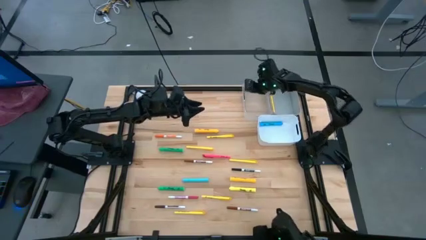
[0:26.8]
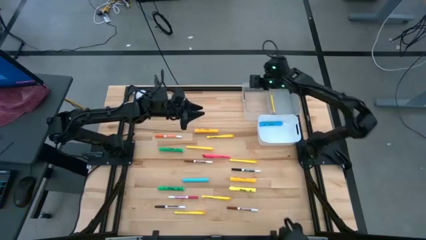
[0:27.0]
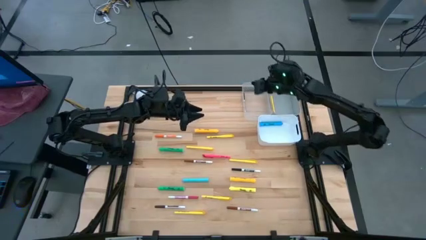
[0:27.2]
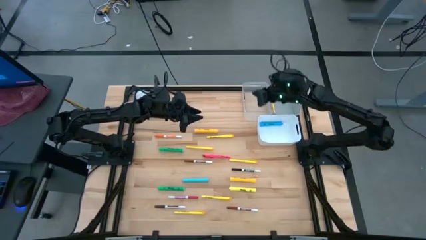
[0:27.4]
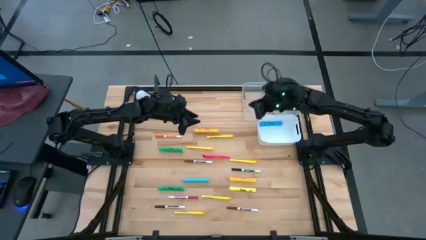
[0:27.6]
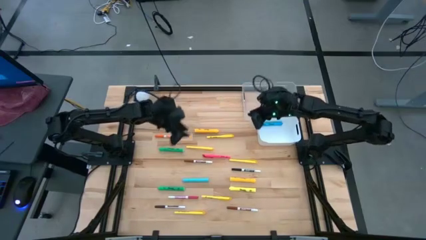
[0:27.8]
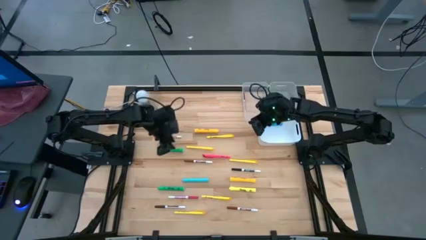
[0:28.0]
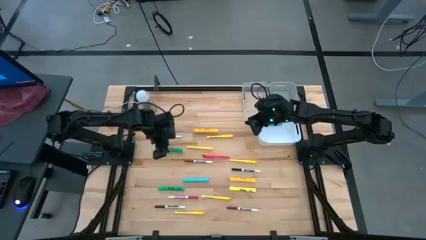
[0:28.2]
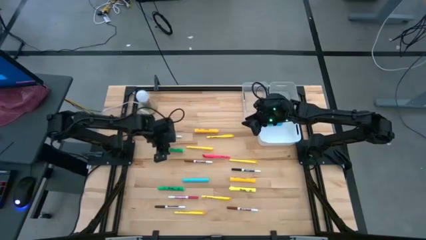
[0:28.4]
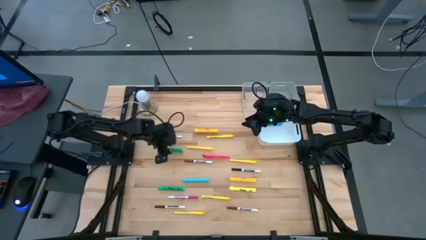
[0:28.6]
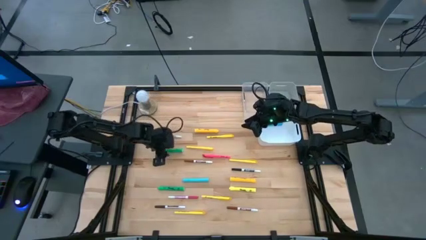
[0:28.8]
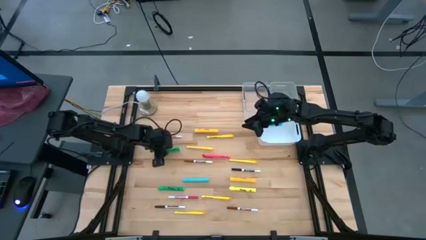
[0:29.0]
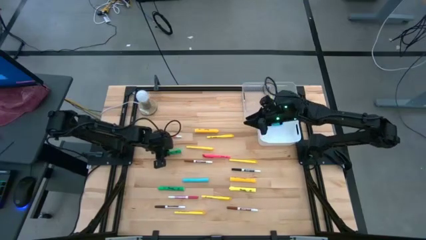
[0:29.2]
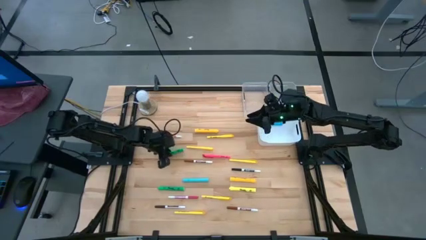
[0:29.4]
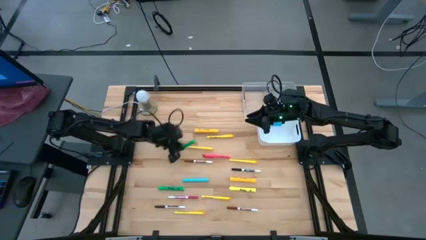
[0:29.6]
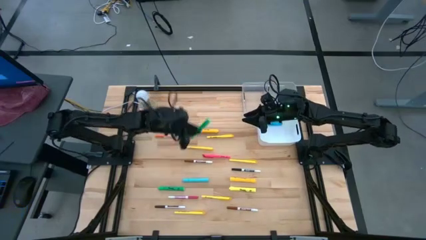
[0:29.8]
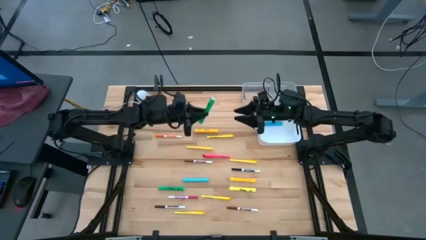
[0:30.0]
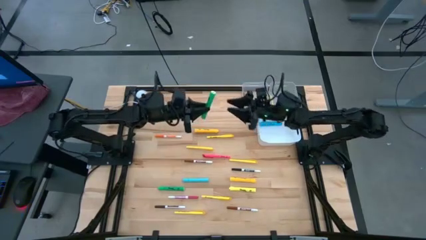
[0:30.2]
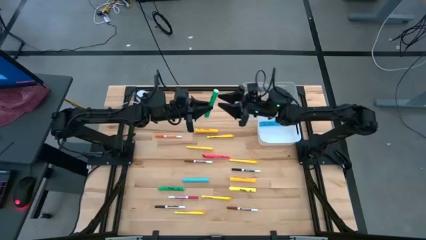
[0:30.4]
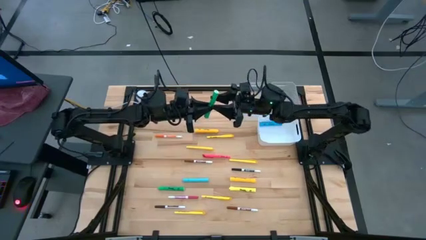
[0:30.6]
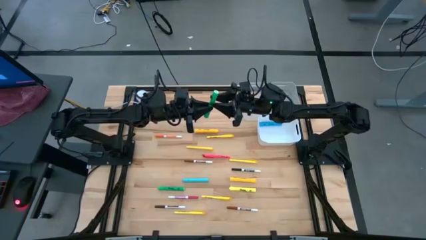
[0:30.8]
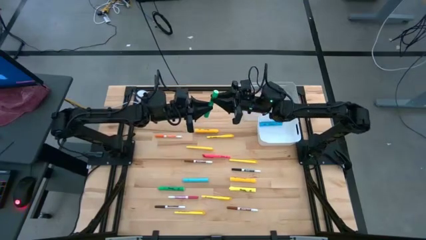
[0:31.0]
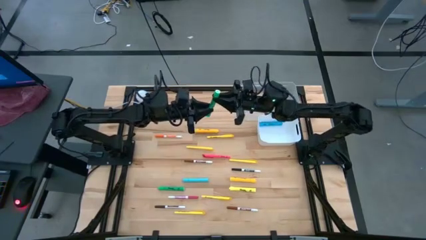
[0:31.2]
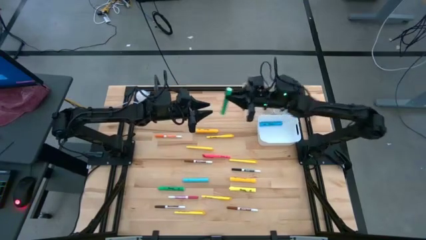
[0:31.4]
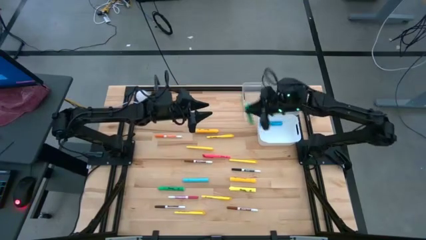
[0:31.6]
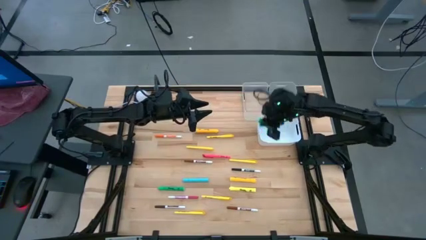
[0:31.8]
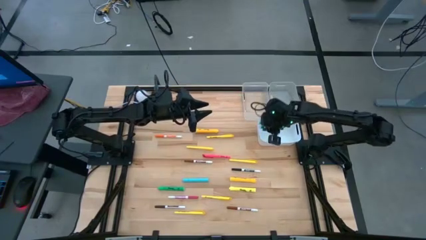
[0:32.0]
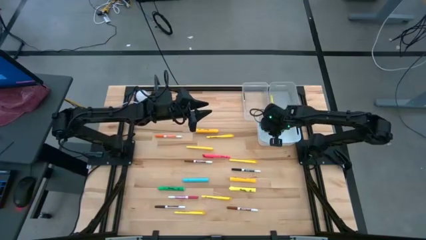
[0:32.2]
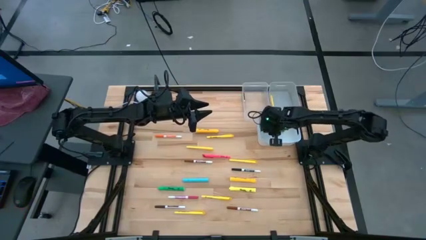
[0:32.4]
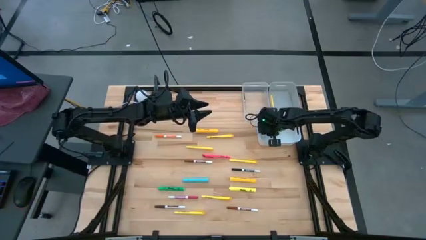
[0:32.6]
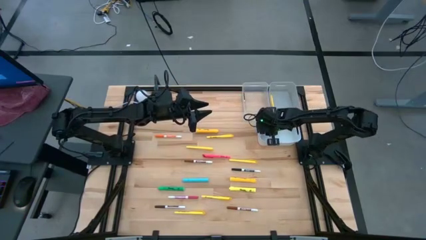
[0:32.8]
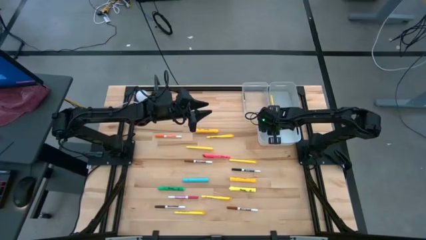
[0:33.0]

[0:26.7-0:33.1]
Task: Pick & Place Markers
Put the green highlighter pen into the white bin

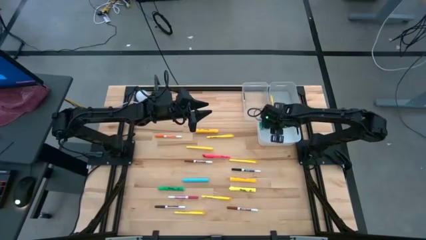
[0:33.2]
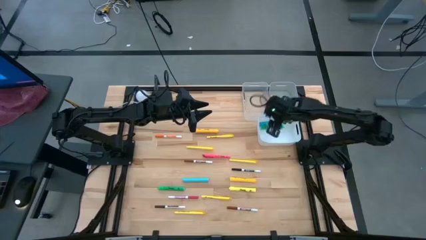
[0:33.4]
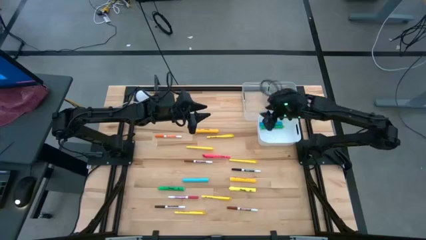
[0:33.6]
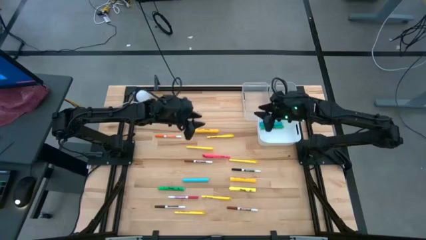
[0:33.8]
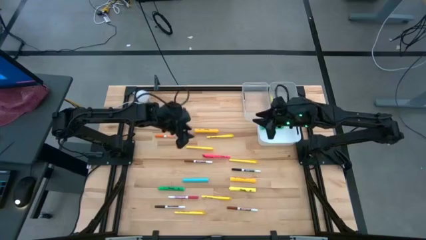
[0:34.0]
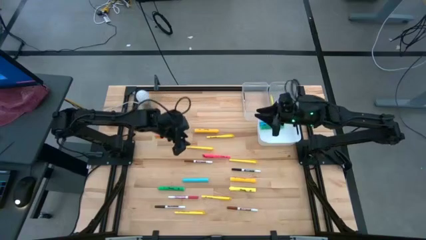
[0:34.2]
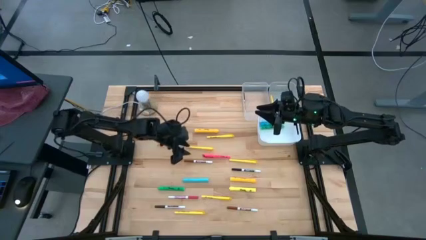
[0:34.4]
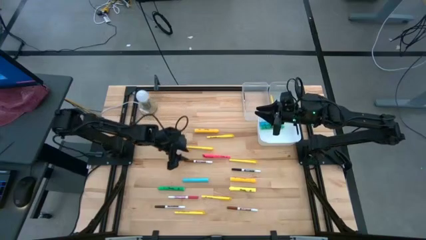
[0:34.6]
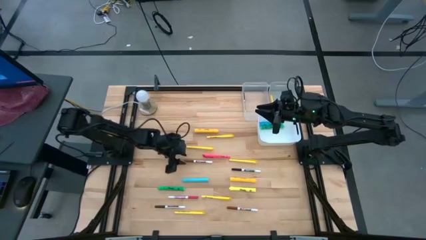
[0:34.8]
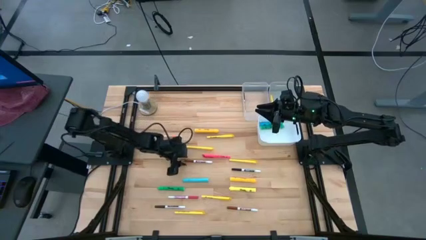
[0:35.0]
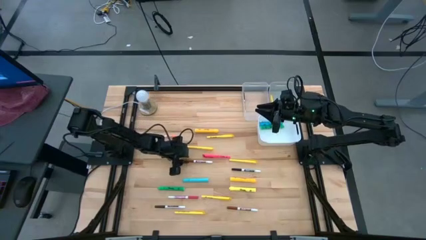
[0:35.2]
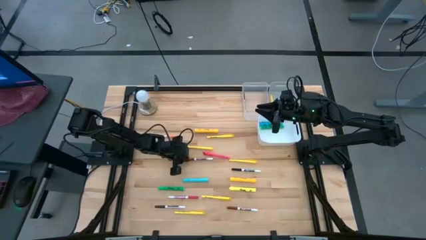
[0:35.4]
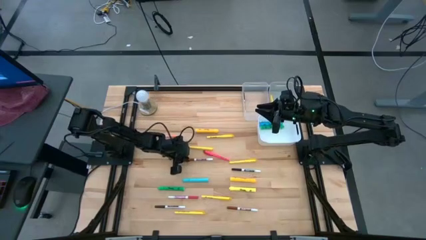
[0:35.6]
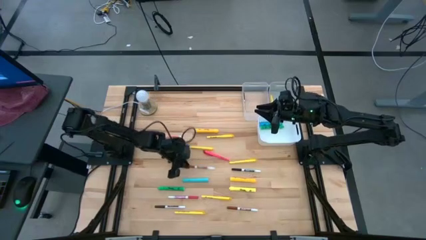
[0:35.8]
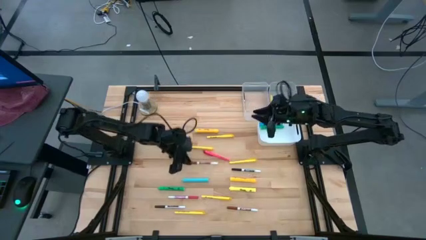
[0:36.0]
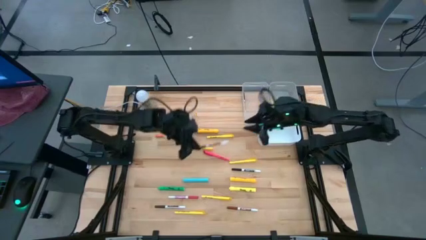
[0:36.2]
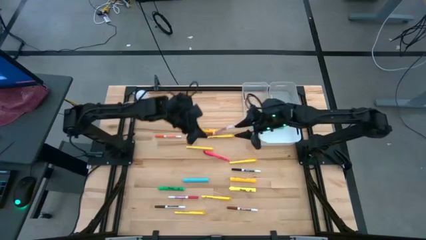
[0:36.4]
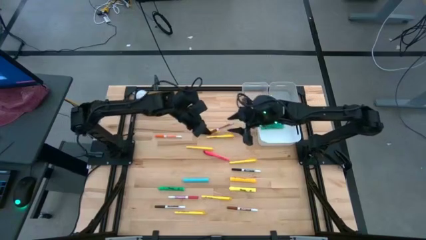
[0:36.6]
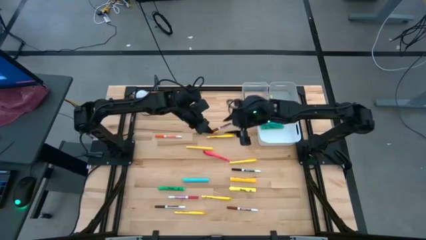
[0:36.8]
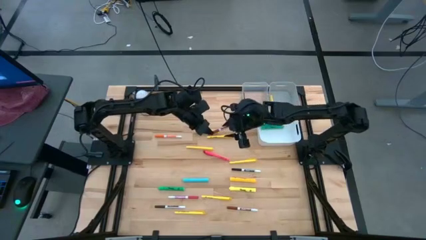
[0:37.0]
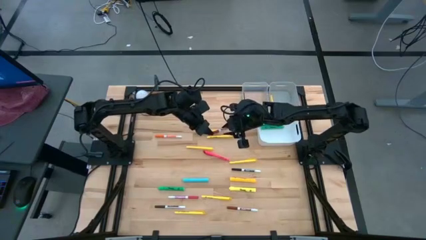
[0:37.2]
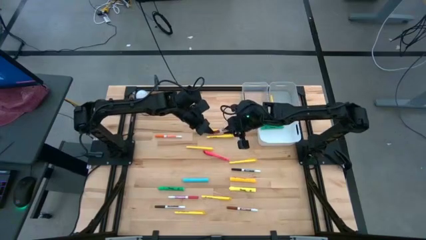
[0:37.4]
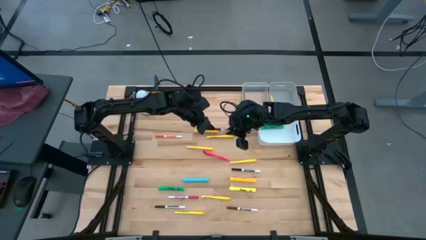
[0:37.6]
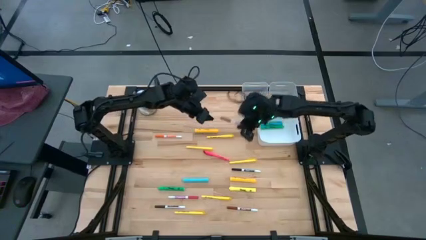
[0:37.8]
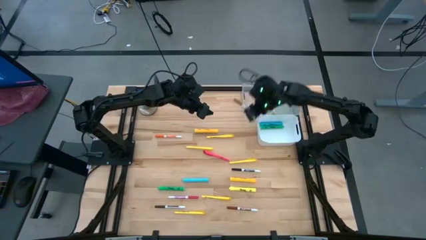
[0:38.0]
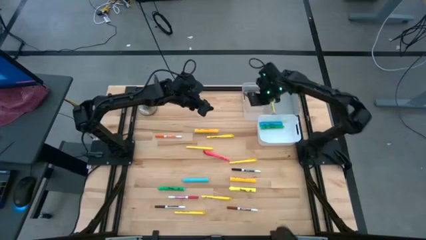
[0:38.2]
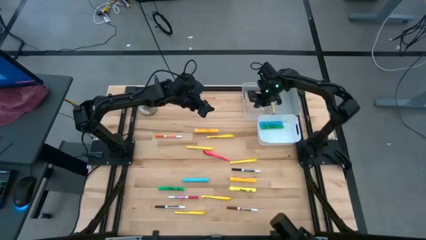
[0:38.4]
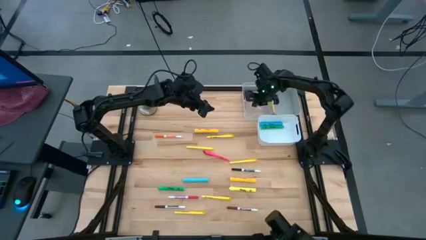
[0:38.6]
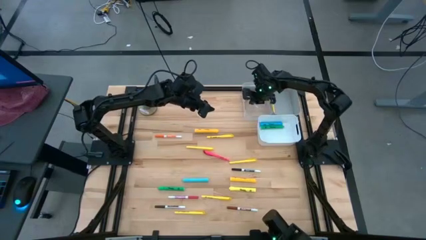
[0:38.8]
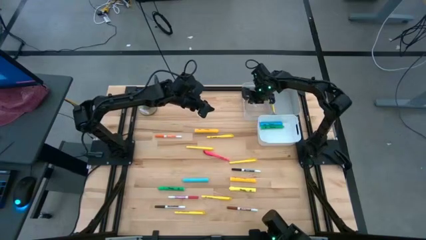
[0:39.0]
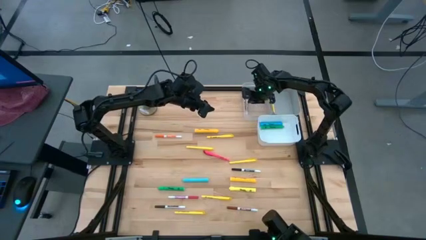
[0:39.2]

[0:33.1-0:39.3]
Put the brown marker pen into the transparent bin

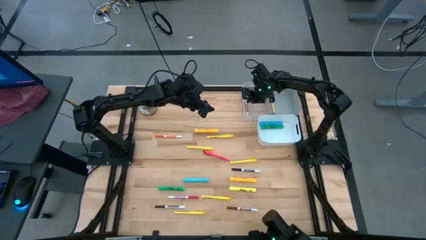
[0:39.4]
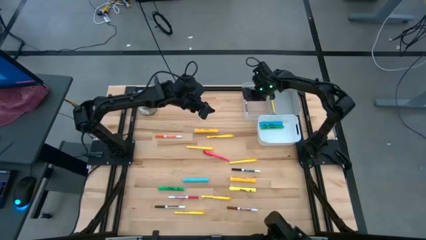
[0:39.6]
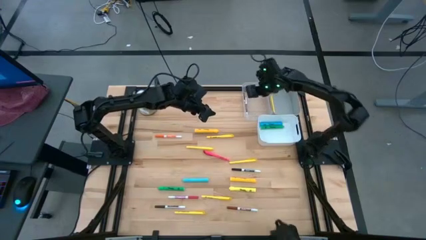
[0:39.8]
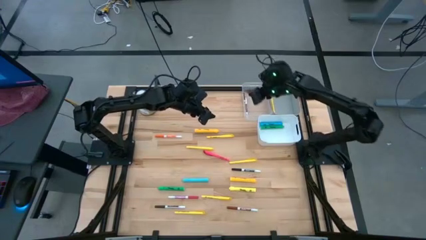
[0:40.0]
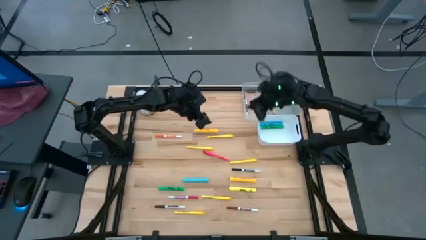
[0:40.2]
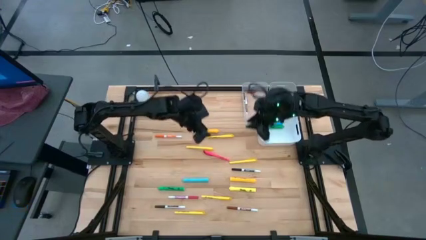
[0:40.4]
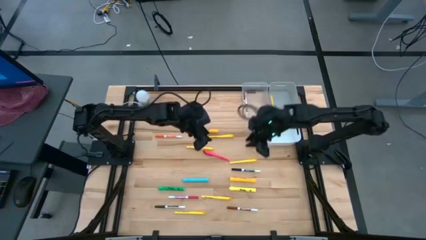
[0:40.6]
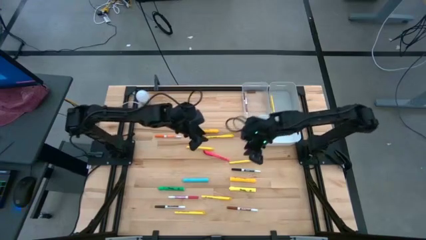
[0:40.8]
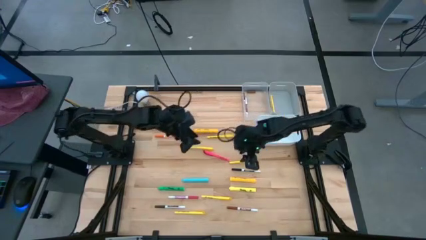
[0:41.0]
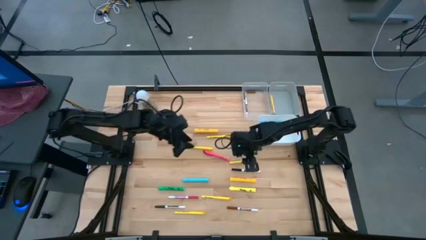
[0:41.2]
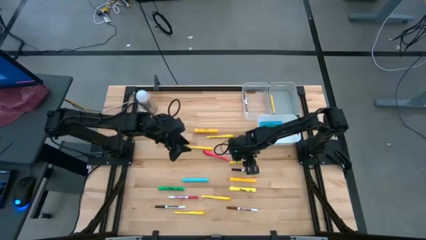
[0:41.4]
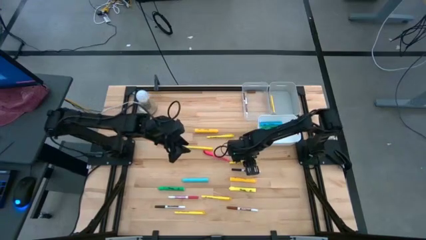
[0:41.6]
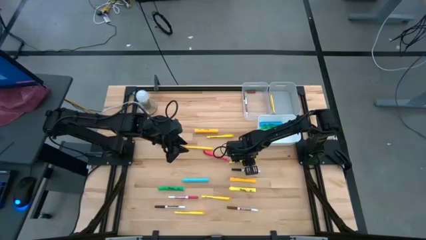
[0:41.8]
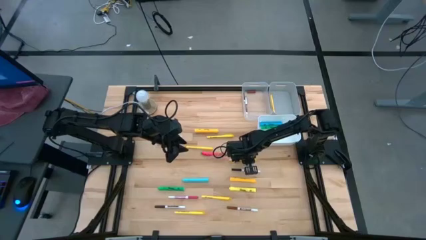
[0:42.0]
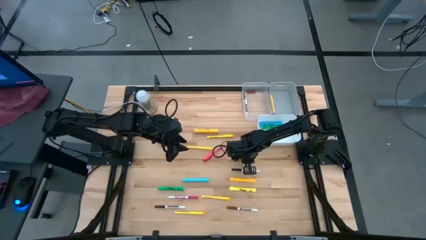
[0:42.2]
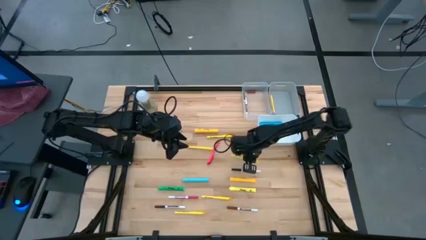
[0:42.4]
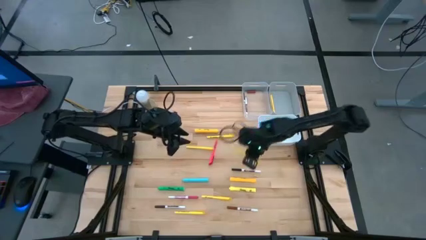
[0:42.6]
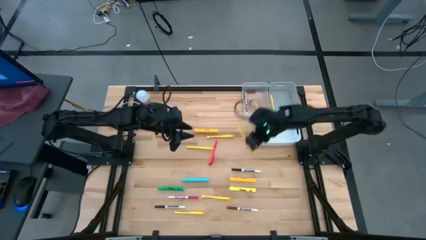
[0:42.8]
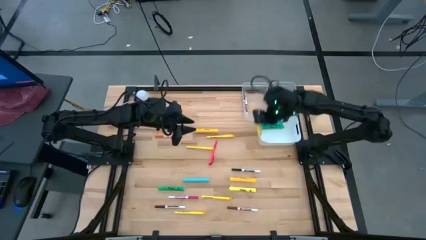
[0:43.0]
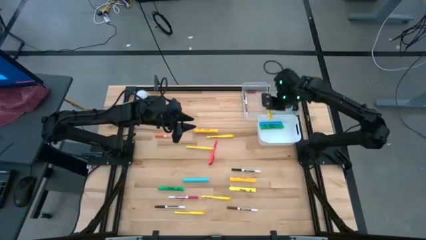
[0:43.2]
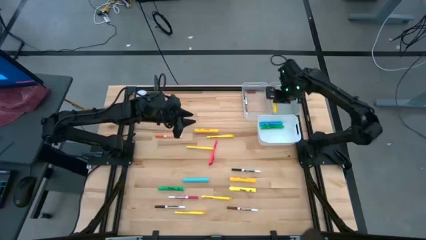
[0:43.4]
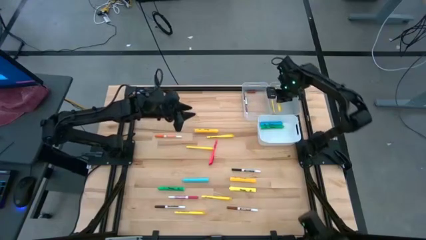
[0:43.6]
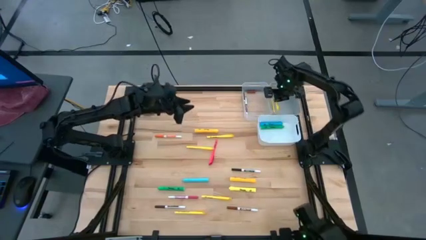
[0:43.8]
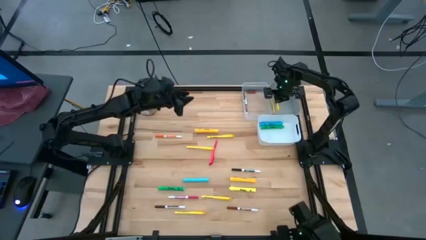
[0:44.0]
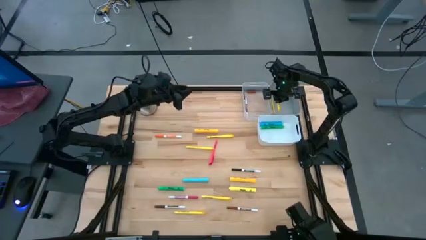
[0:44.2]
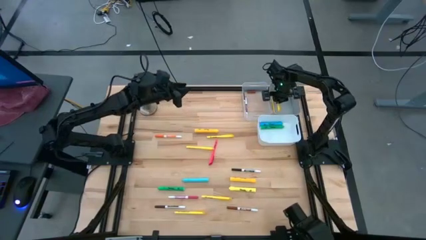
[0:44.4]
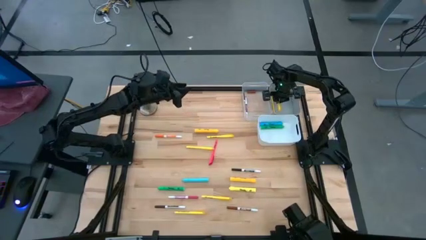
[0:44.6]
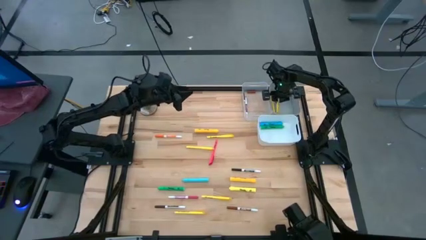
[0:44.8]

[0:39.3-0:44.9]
Put the yellow pen into the gray bin
